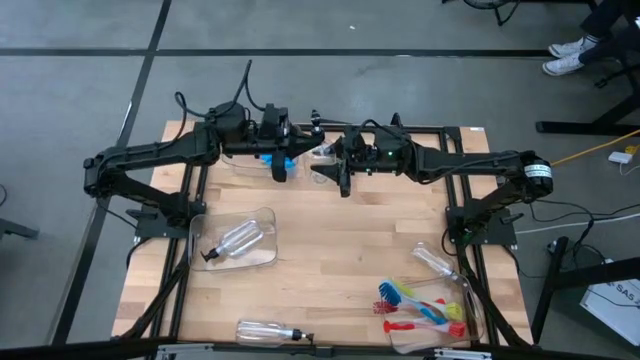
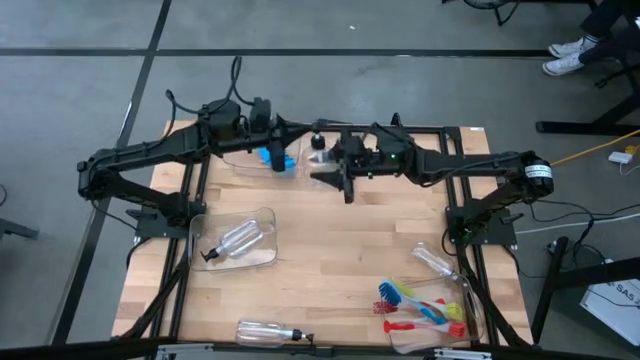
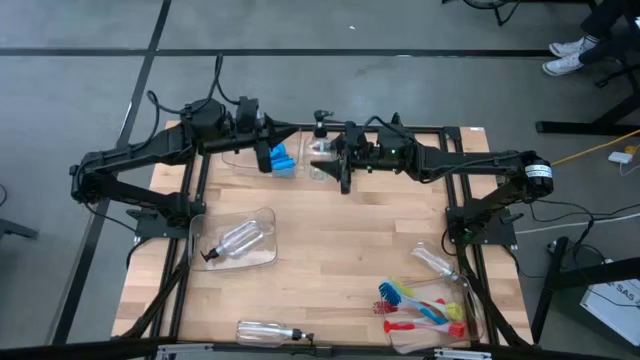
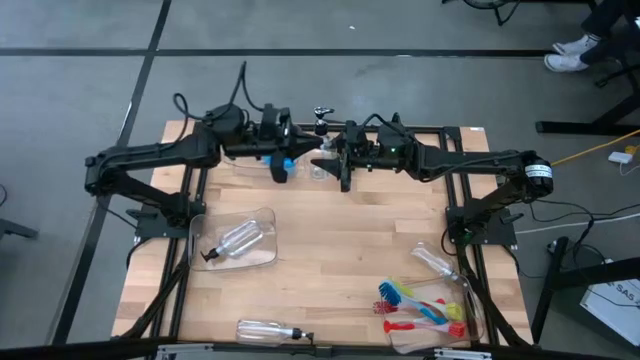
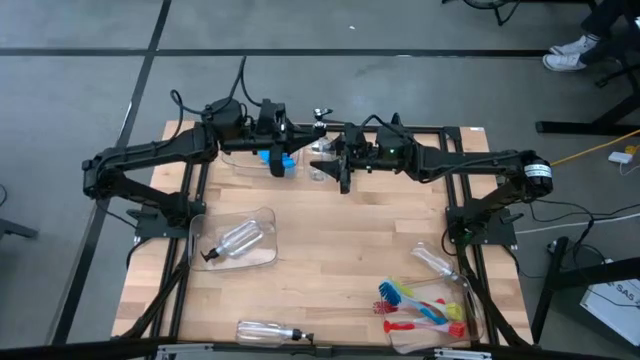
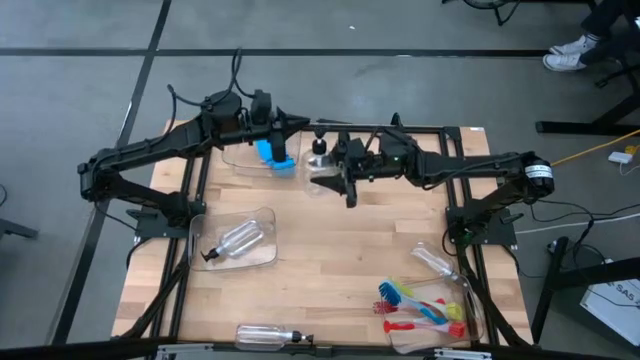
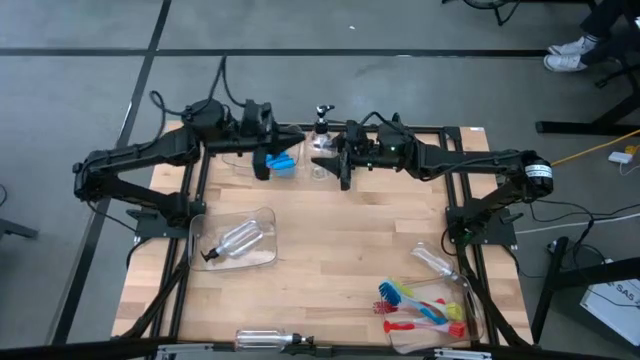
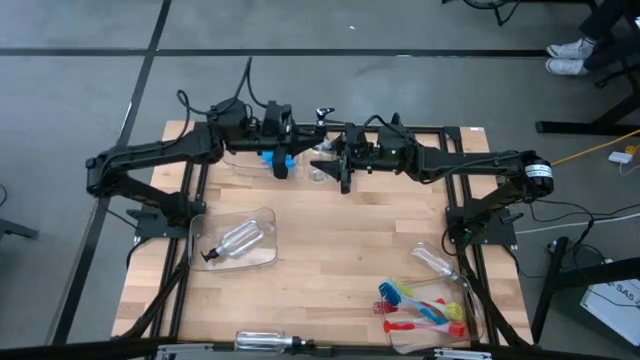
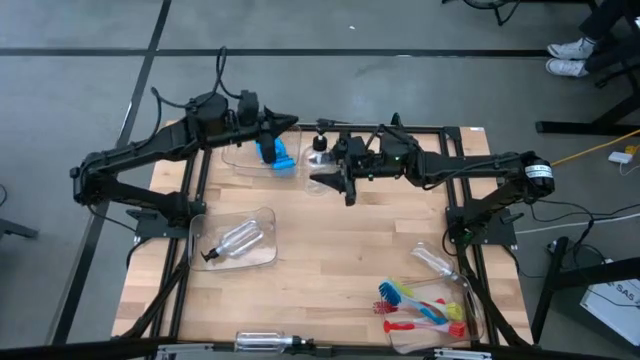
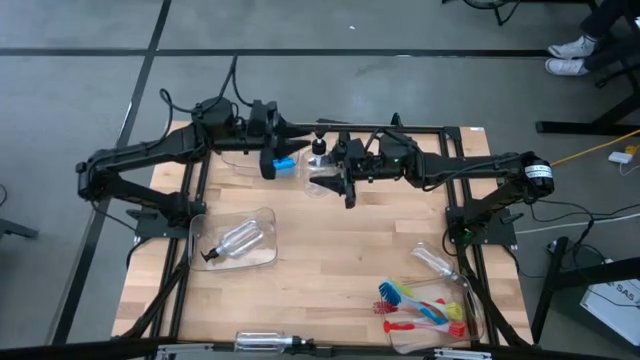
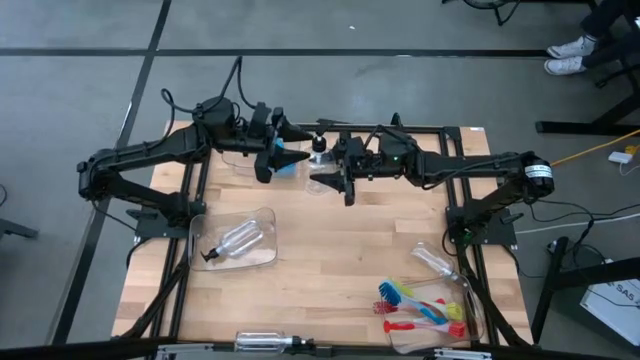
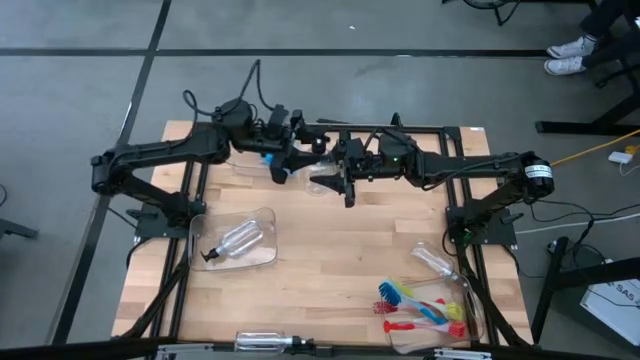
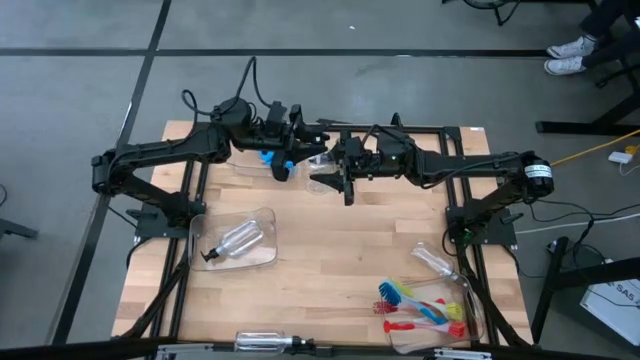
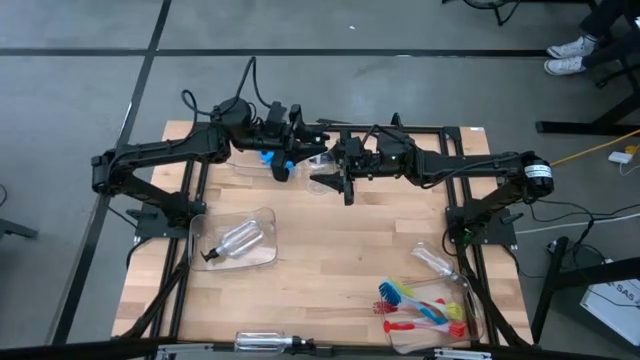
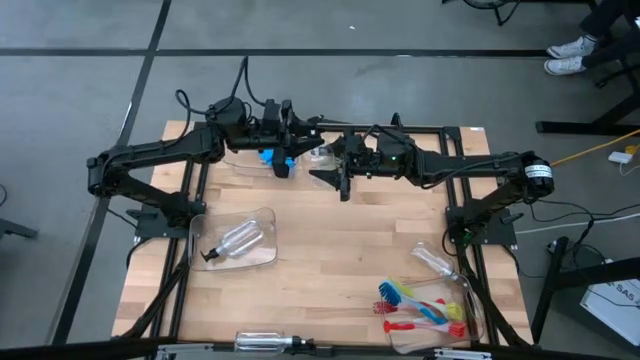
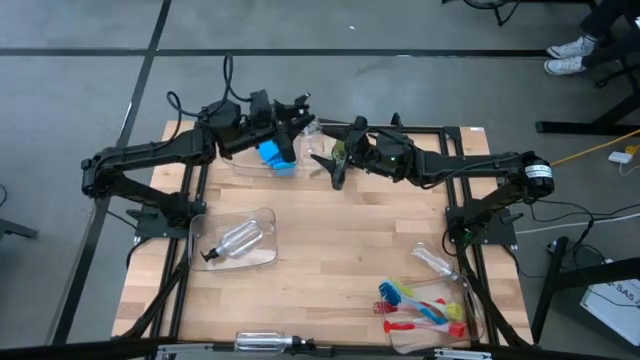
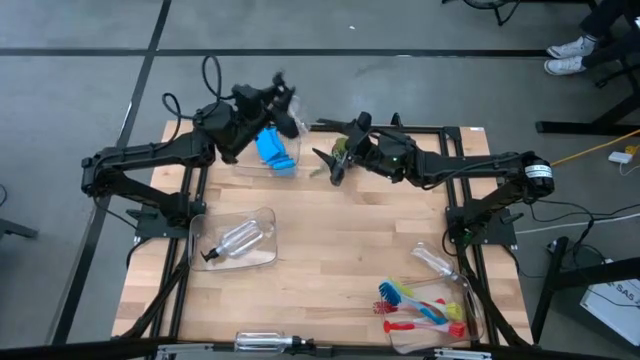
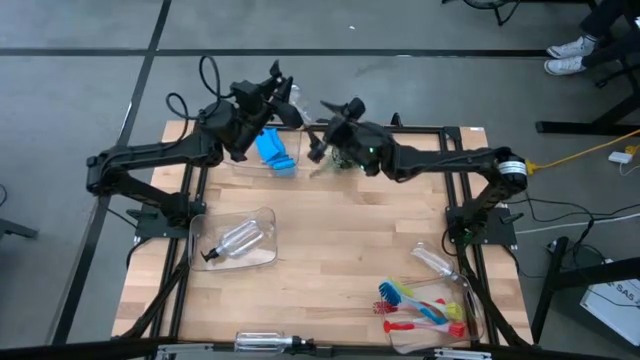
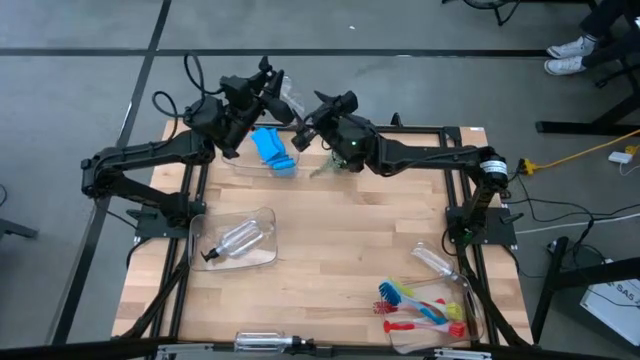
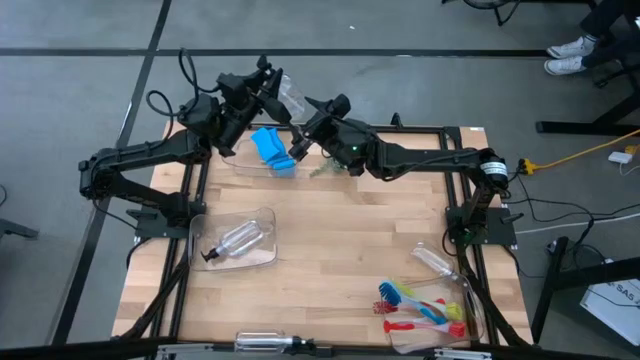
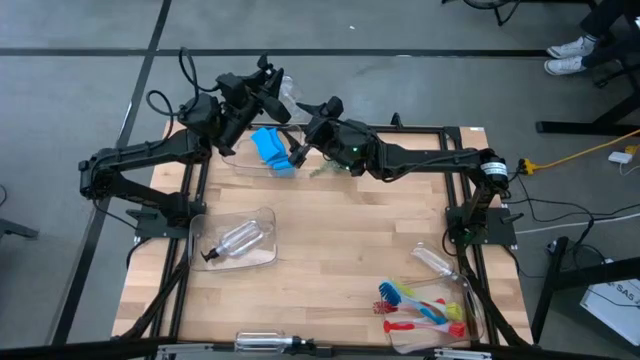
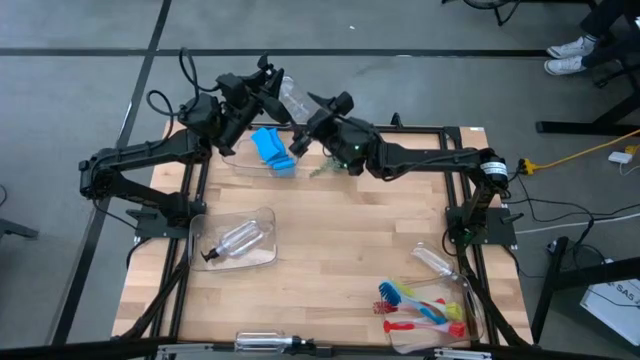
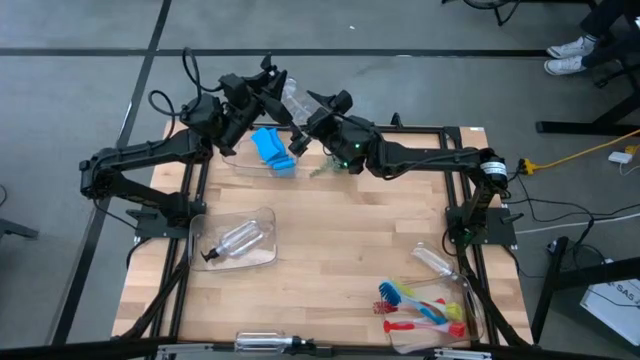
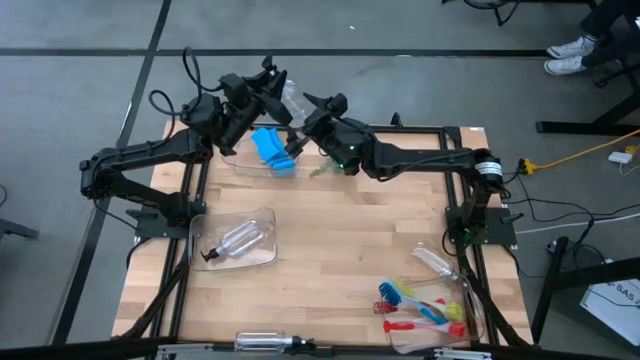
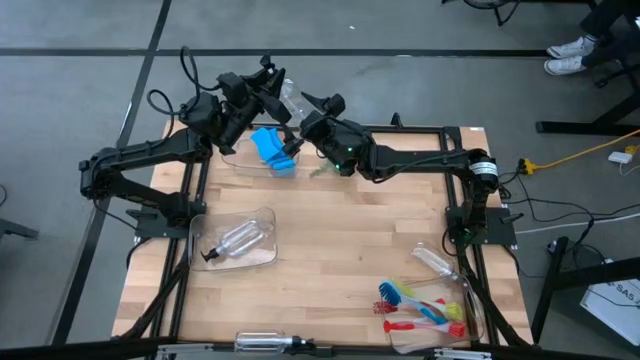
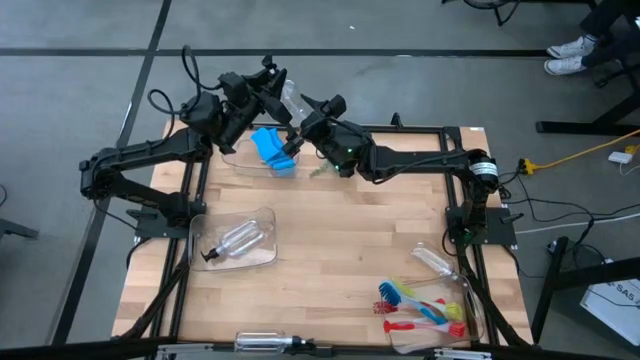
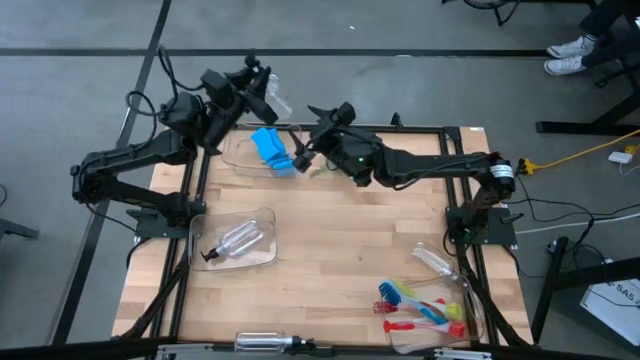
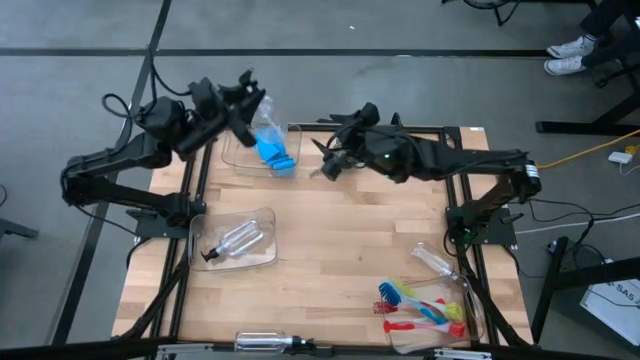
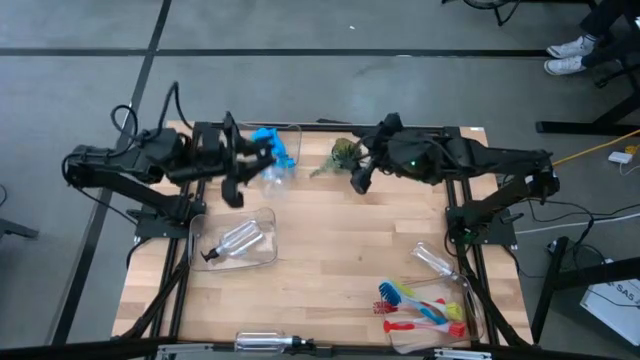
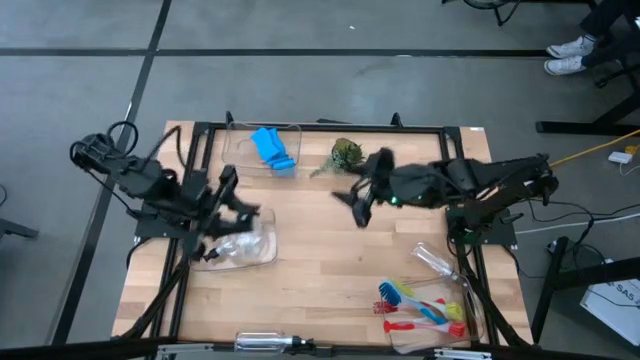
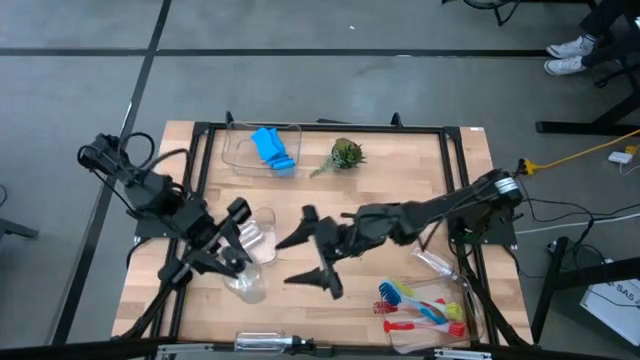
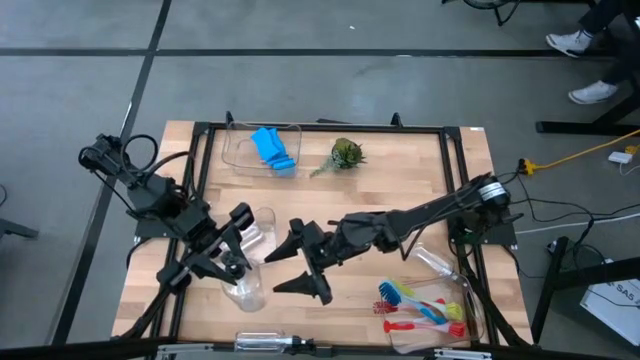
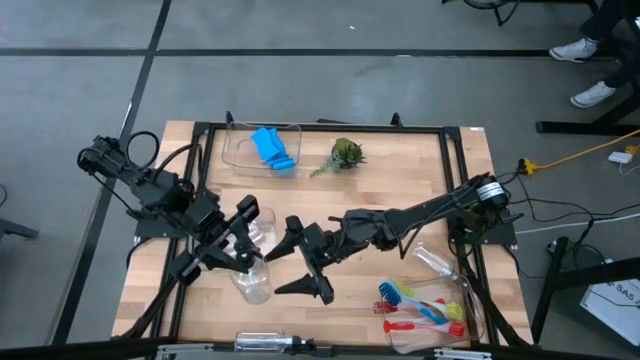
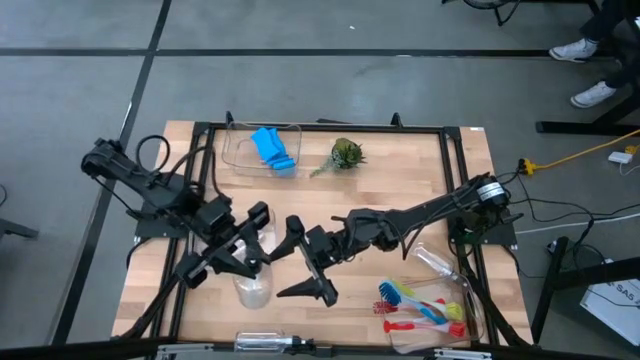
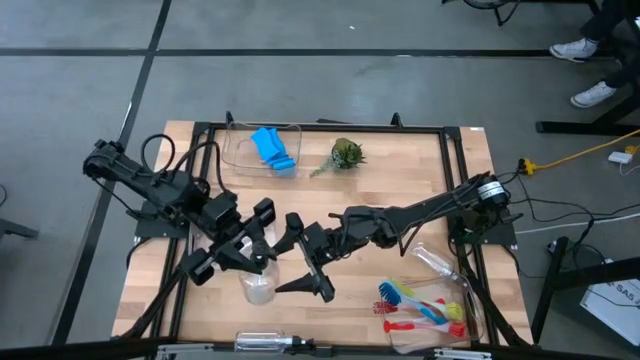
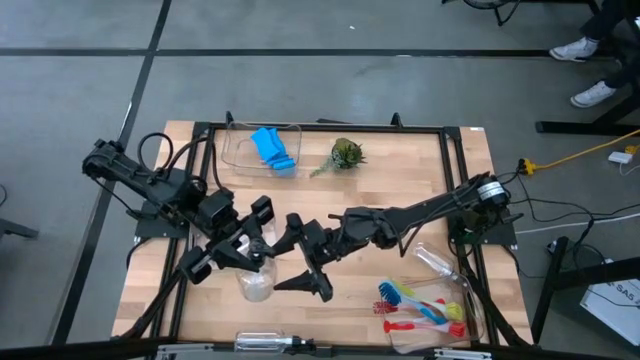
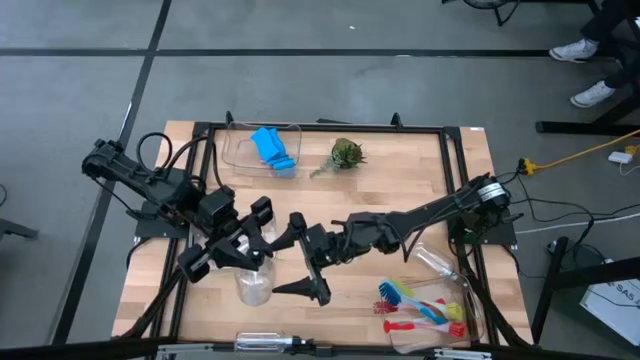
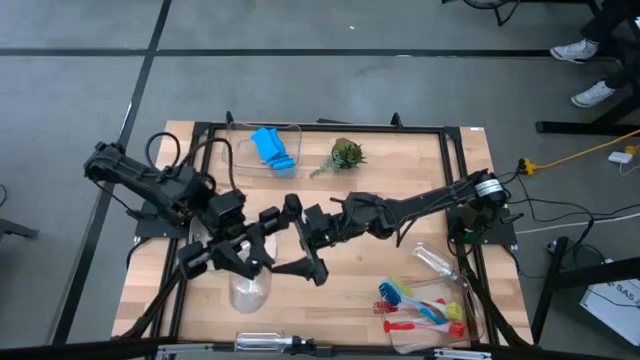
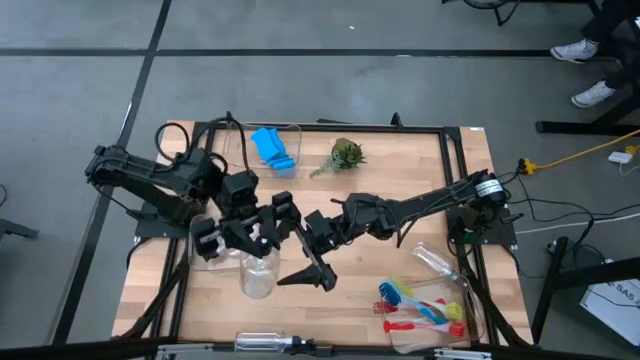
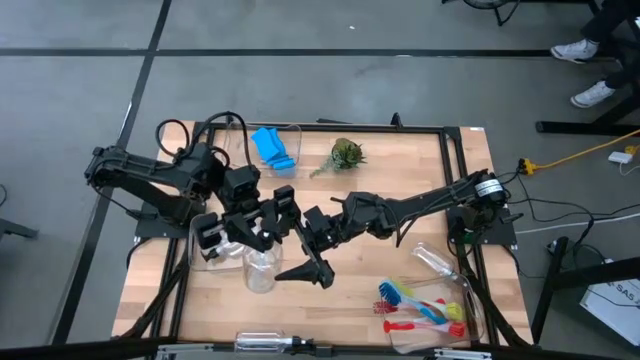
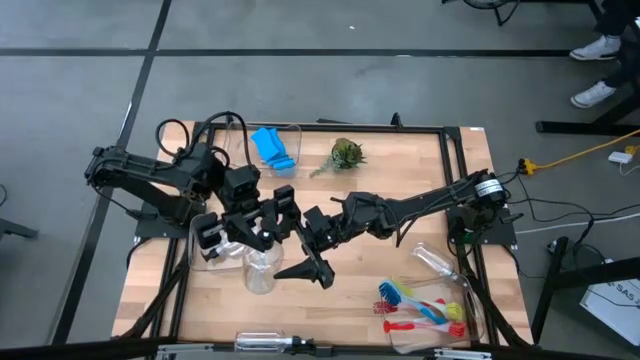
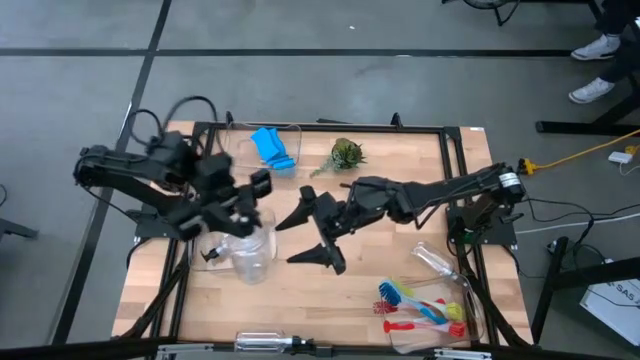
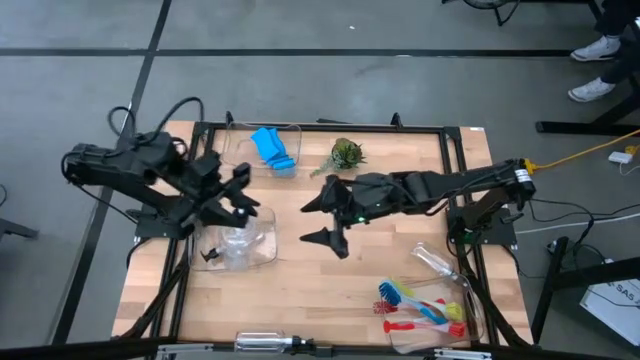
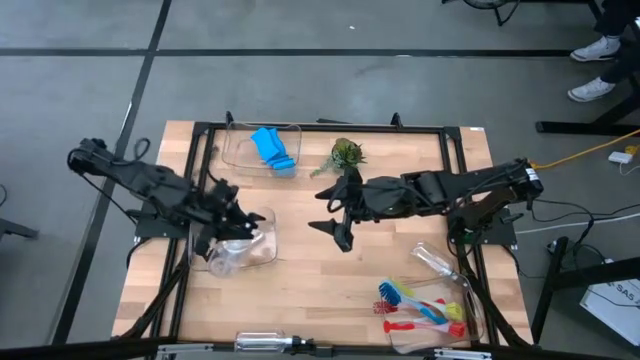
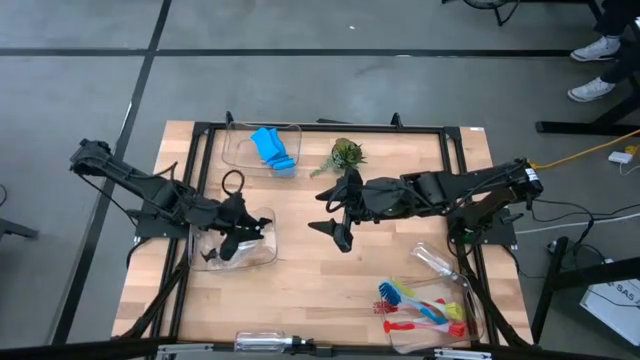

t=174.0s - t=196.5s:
Task: Pick & Place Kitchen Sink Supplies
Put the transparent soap dispenser into the middle transparent bin
